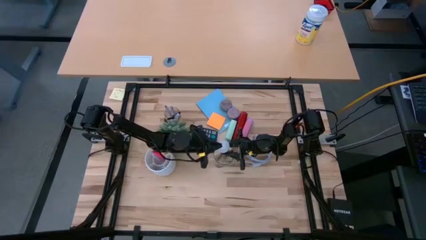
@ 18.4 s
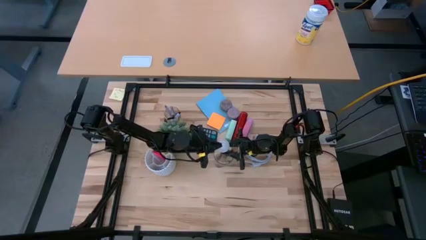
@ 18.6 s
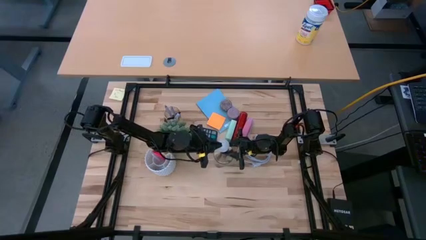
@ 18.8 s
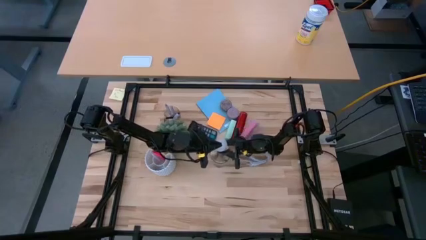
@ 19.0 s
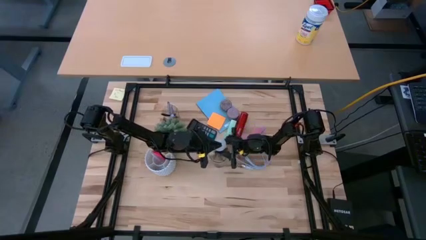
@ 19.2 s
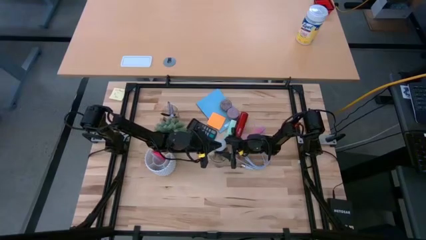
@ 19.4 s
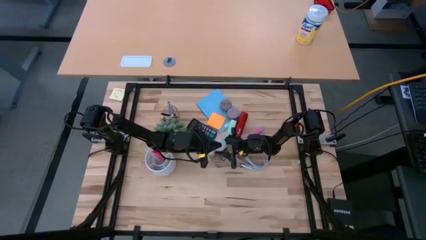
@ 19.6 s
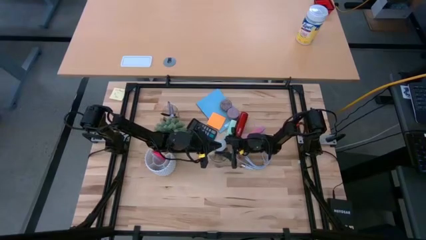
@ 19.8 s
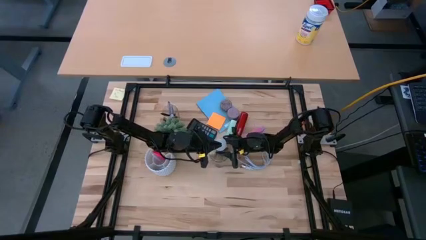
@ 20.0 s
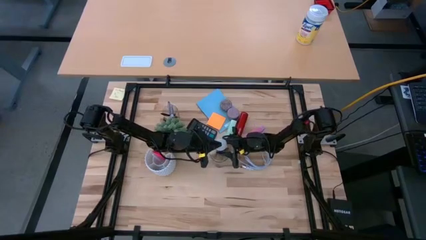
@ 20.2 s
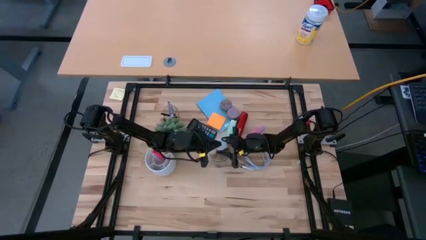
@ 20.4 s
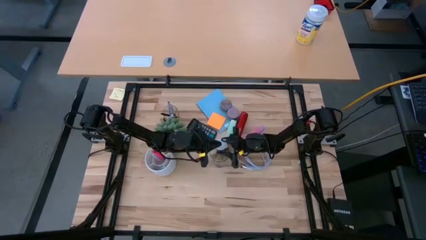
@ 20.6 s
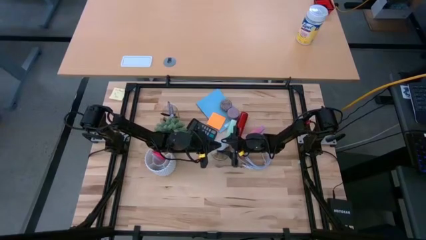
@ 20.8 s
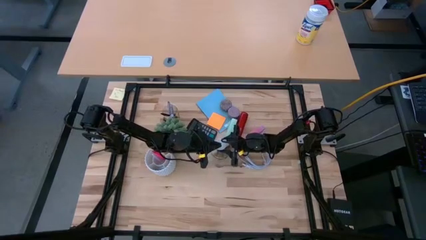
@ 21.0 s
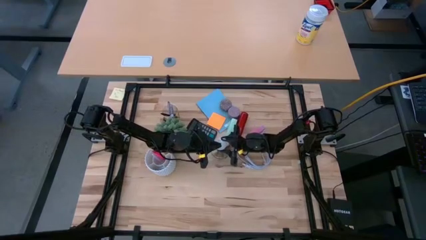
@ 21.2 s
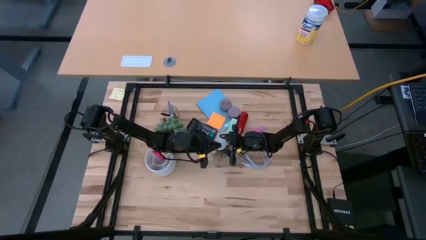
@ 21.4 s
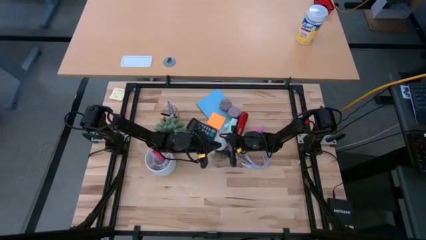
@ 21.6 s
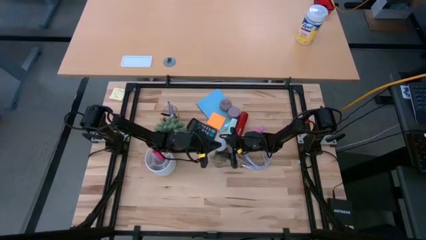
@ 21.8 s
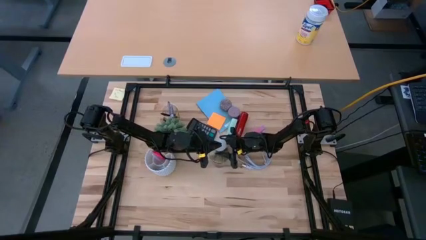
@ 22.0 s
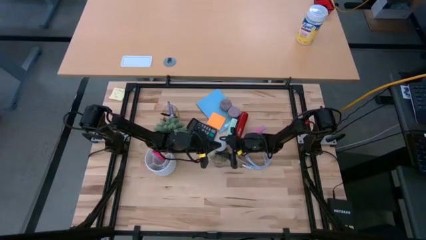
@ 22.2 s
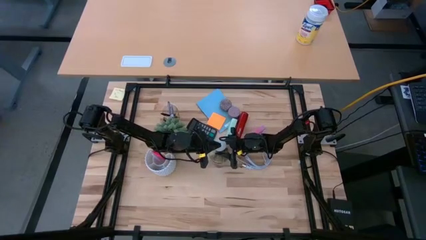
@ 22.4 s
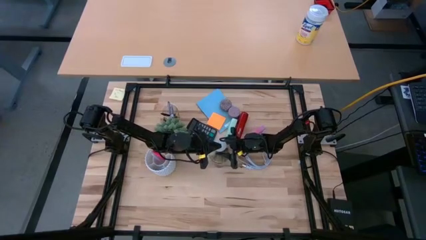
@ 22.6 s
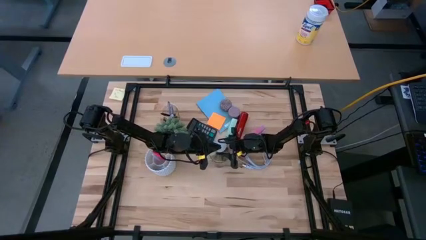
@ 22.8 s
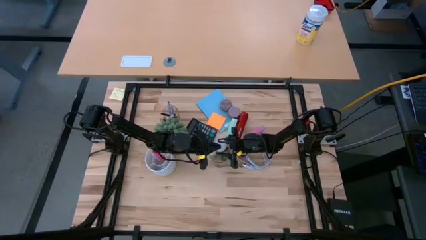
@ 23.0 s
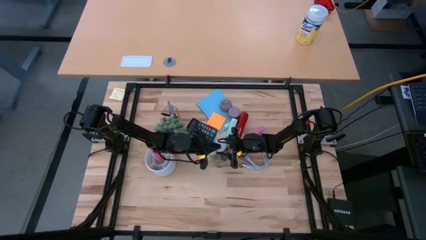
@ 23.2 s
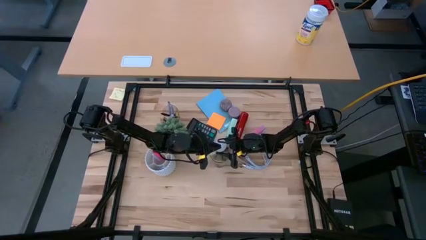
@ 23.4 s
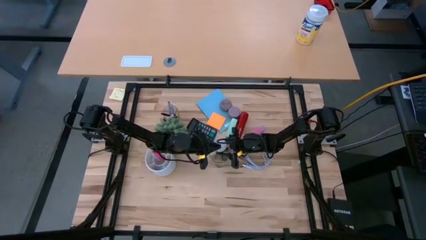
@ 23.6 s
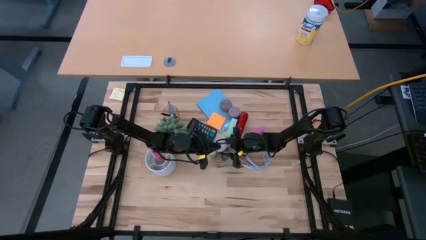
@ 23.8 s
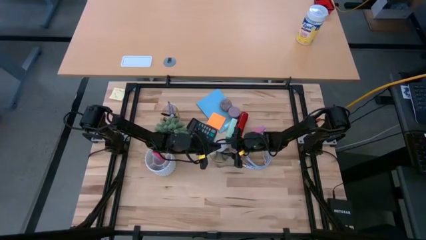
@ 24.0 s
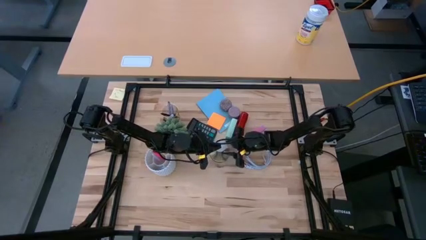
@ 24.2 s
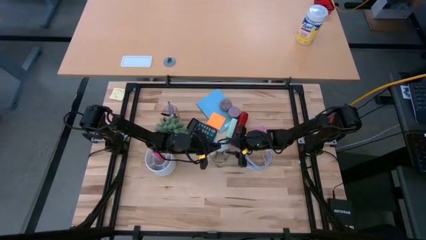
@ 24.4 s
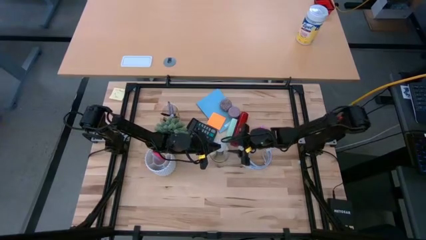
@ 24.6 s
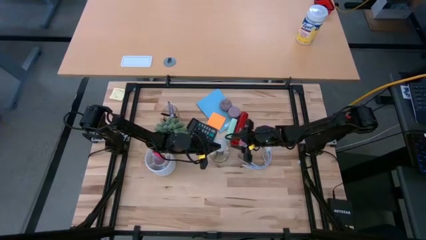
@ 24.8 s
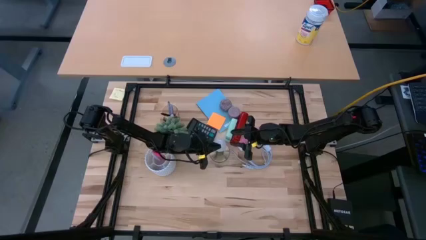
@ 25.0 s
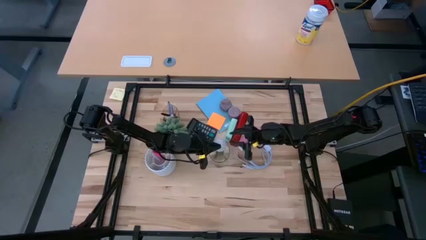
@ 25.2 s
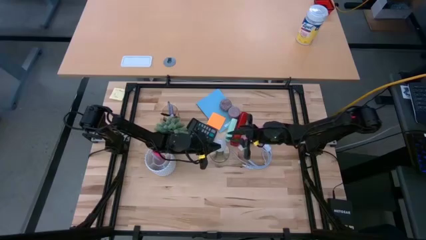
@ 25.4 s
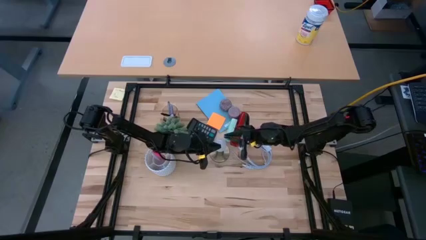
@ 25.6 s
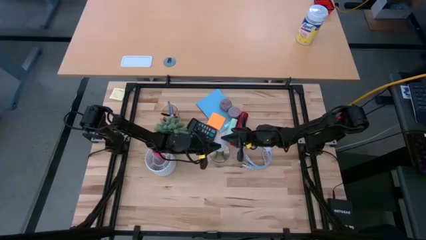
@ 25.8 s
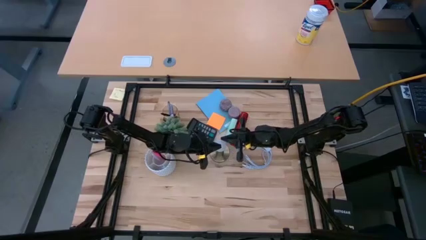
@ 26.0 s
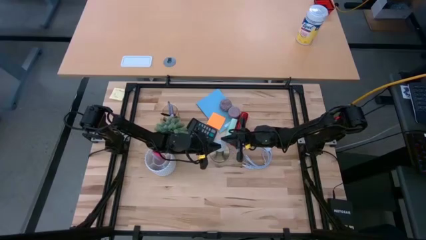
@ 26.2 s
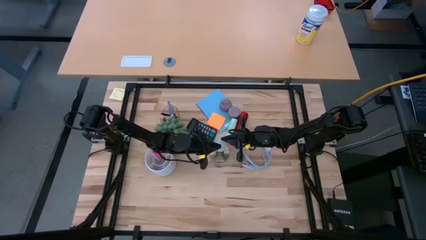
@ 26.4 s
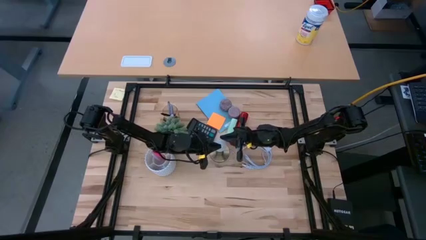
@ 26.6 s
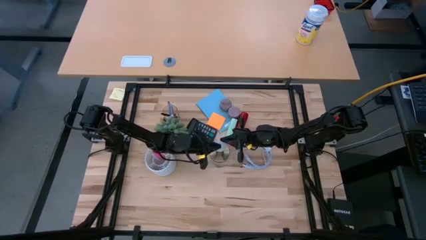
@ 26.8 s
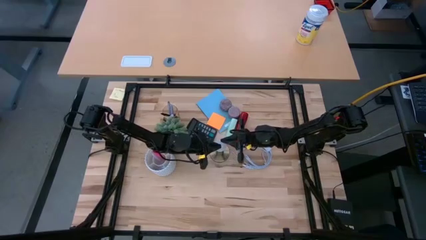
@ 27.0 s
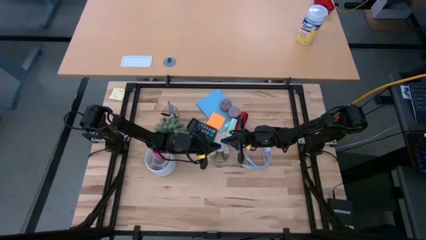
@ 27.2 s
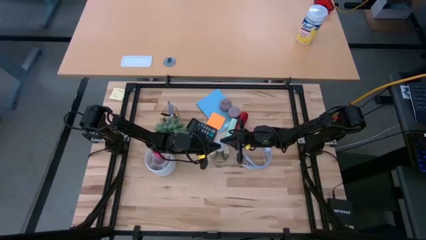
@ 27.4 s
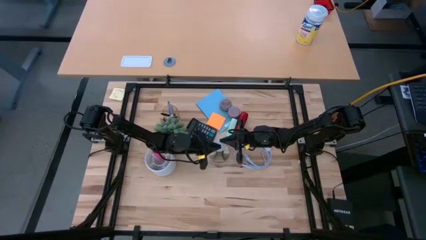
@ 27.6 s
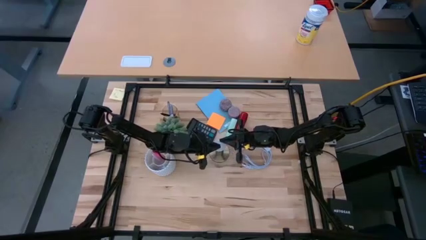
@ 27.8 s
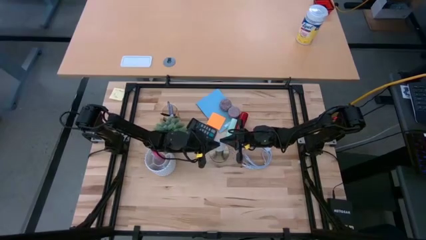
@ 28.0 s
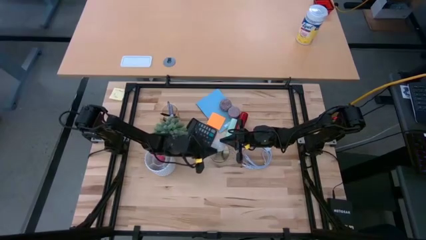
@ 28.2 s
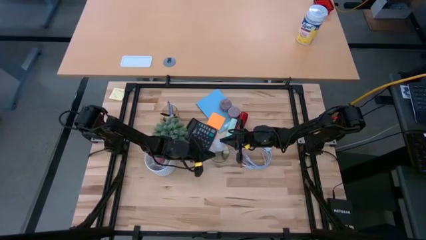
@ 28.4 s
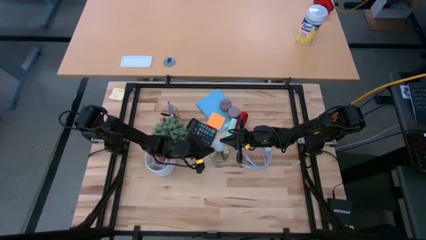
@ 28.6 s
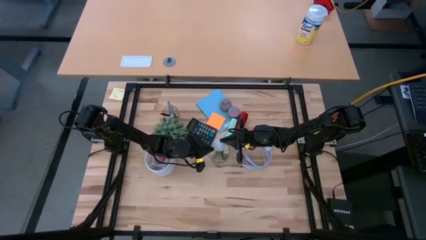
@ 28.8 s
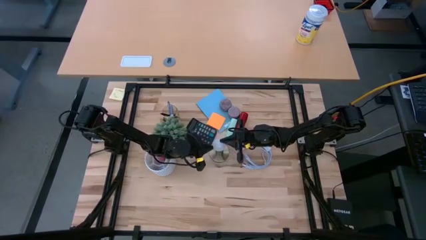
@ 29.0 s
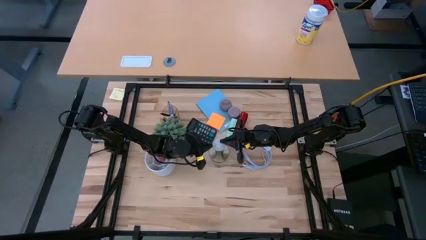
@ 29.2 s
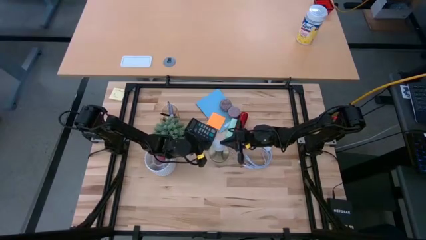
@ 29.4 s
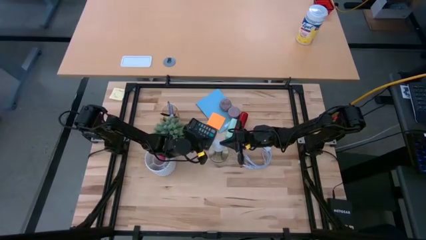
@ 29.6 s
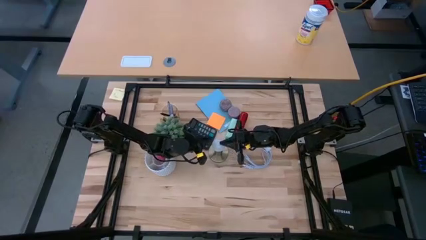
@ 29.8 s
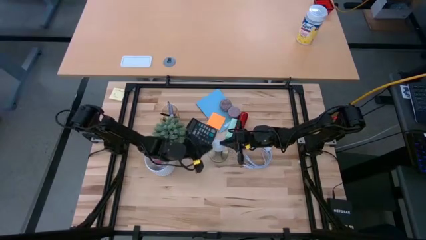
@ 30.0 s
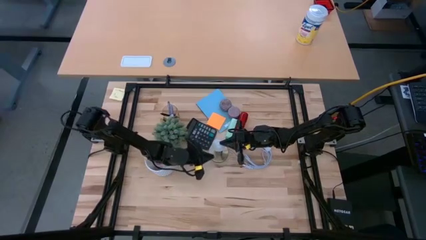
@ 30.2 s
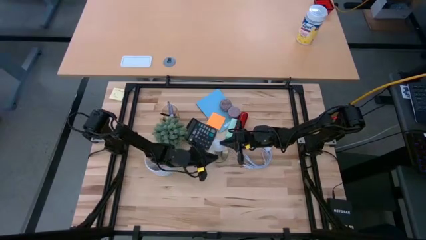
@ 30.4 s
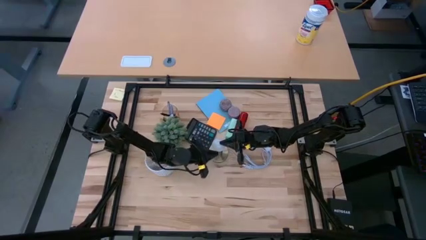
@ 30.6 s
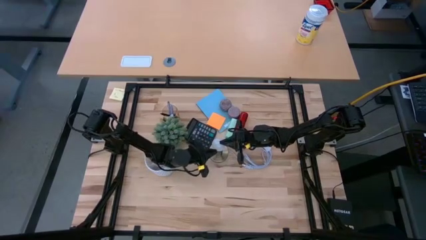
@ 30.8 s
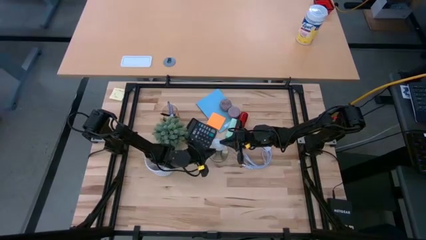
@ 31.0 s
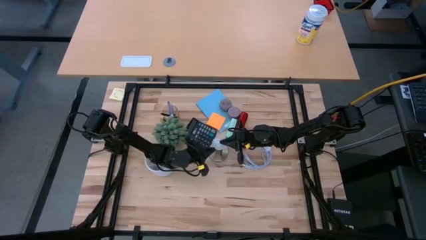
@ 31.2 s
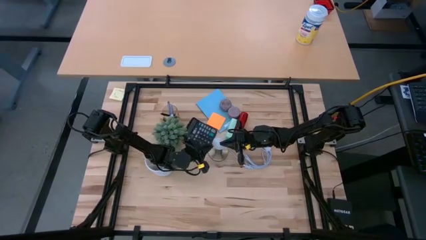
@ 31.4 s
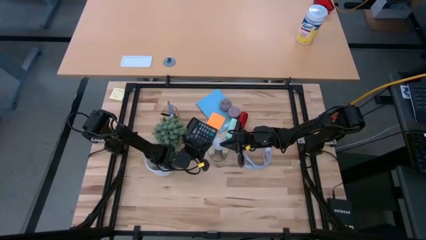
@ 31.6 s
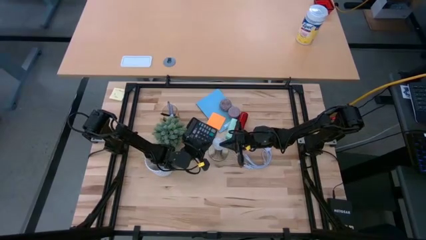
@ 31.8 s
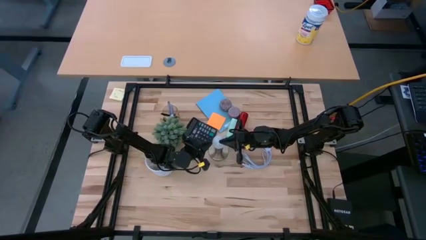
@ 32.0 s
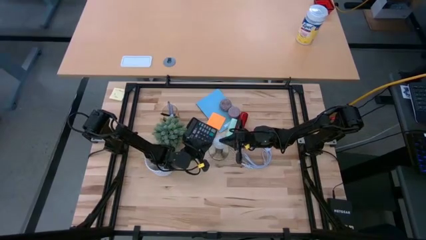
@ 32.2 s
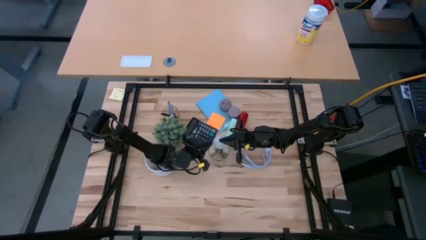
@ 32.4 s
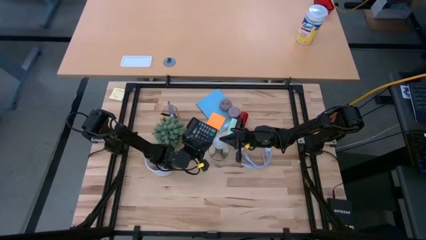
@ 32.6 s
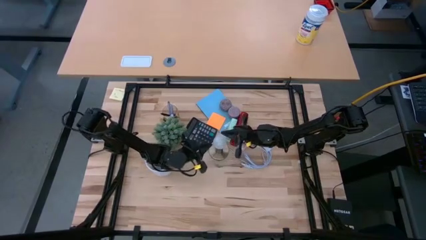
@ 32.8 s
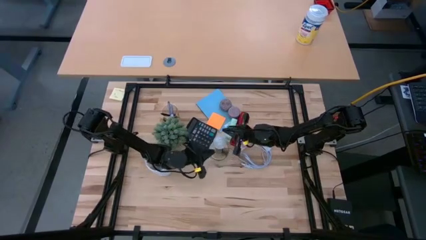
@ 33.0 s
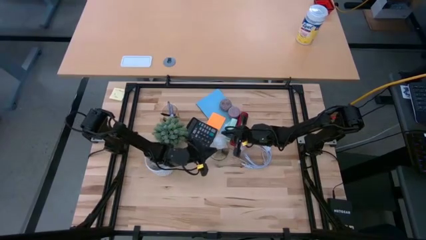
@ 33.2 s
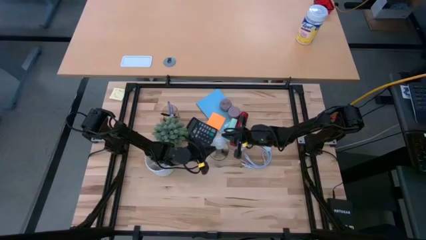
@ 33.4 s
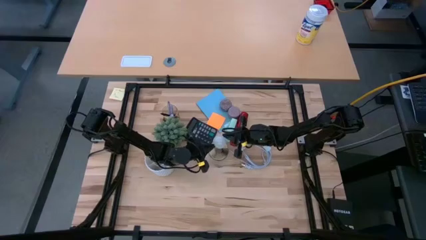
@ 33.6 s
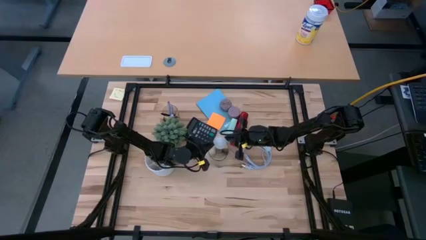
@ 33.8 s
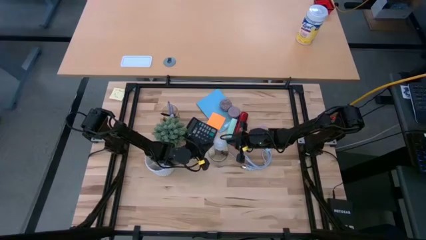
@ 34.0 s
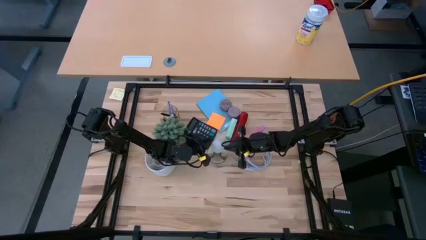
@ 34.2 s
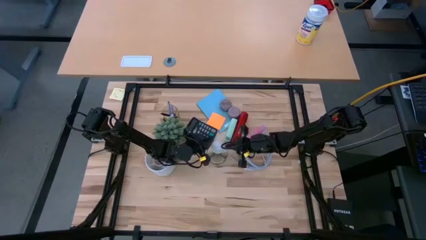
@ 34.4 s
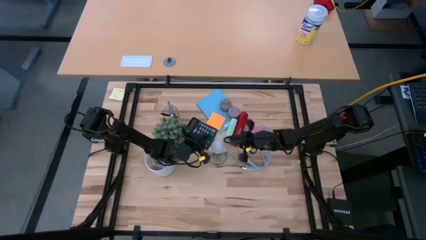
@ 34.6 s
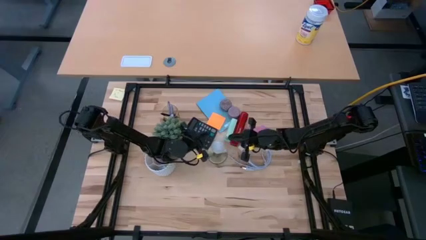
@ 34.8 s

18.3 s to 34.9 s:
Task: Screw lightbulb
Insert the lightbulb into the lamp
